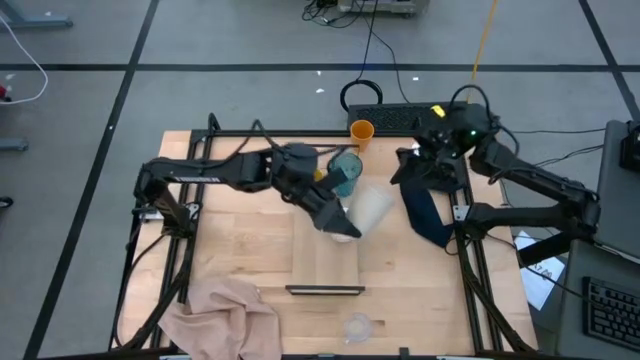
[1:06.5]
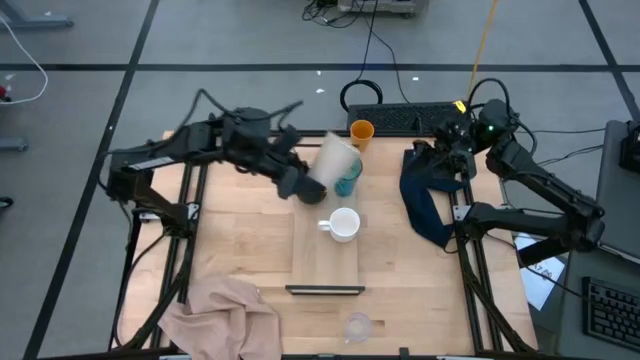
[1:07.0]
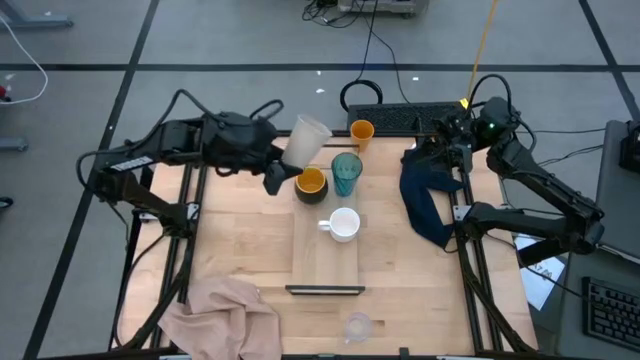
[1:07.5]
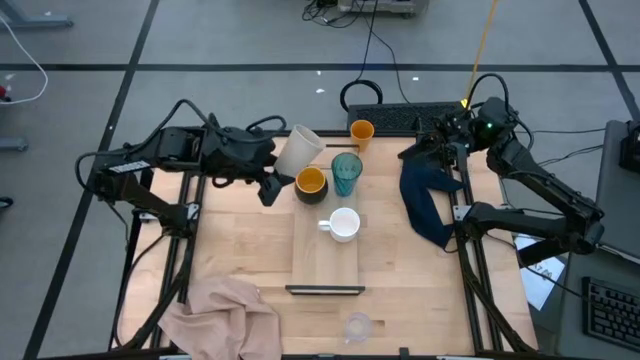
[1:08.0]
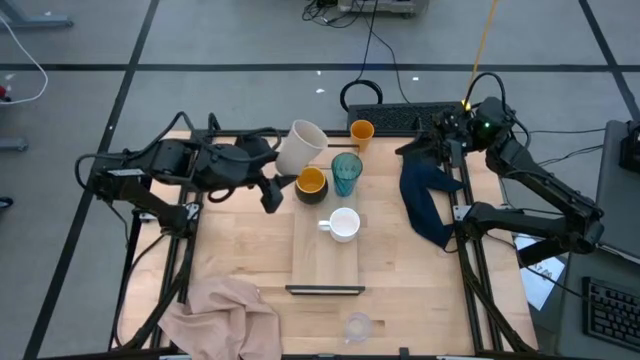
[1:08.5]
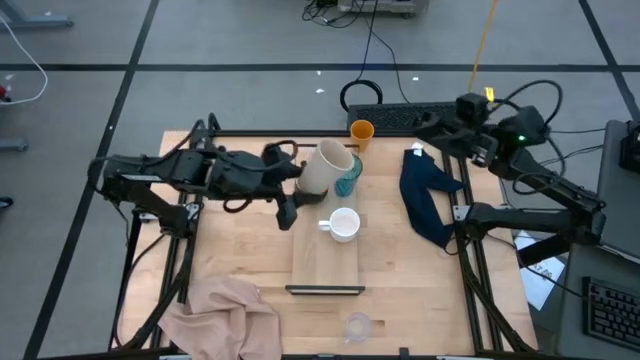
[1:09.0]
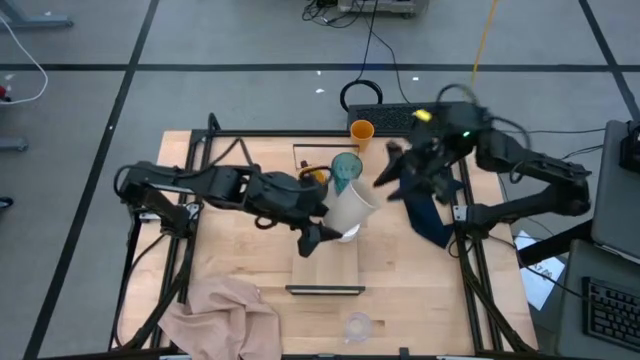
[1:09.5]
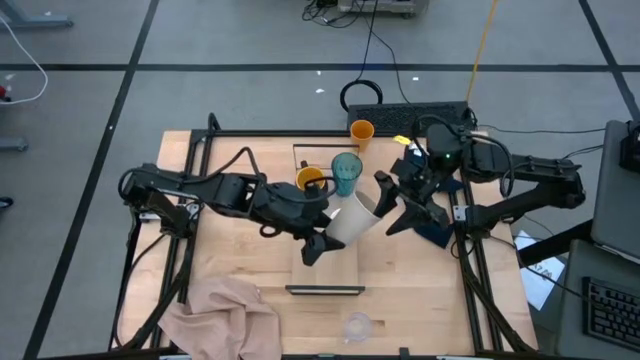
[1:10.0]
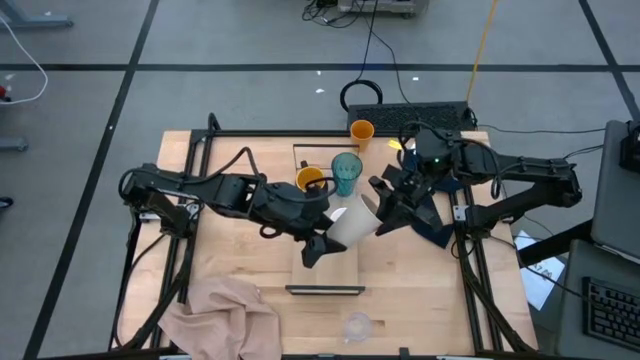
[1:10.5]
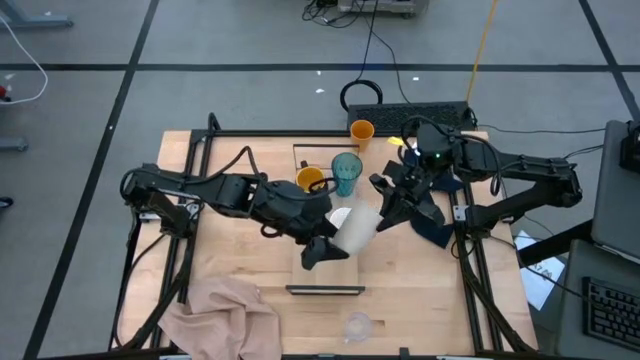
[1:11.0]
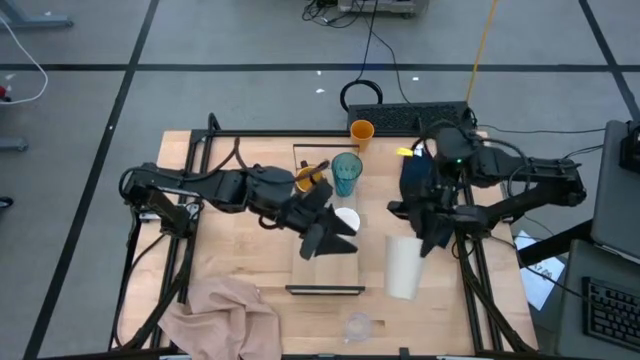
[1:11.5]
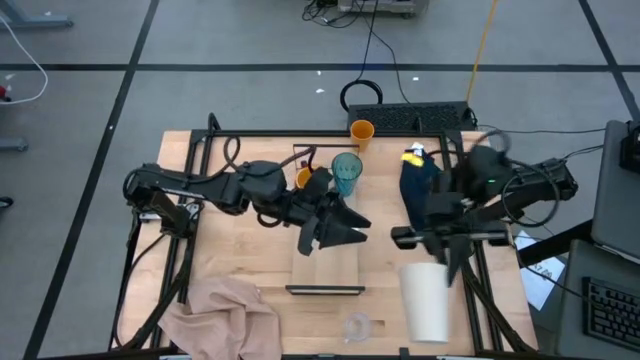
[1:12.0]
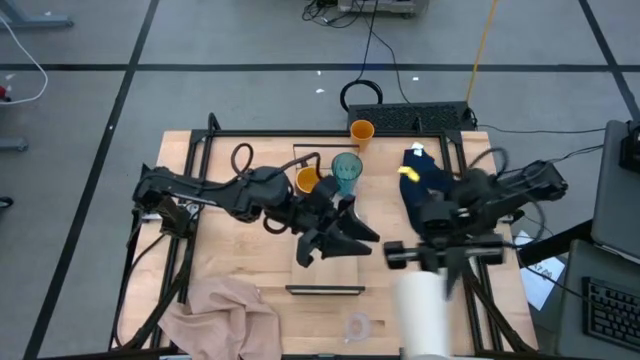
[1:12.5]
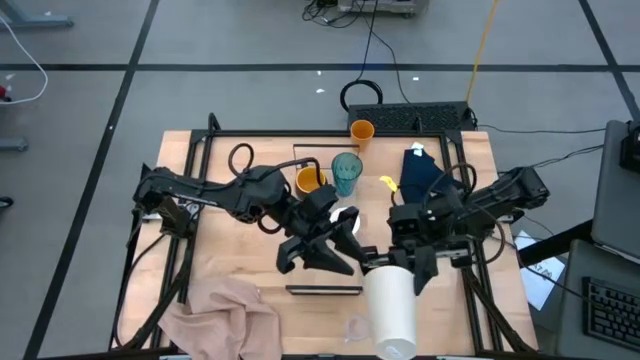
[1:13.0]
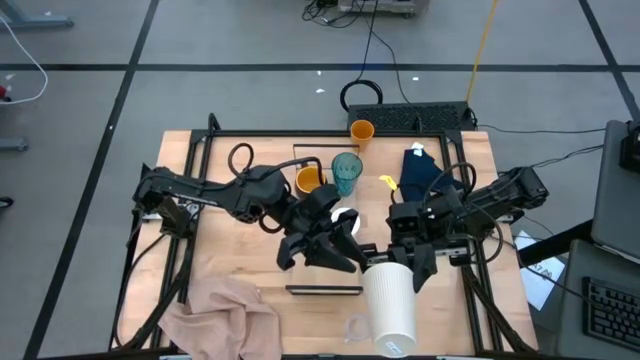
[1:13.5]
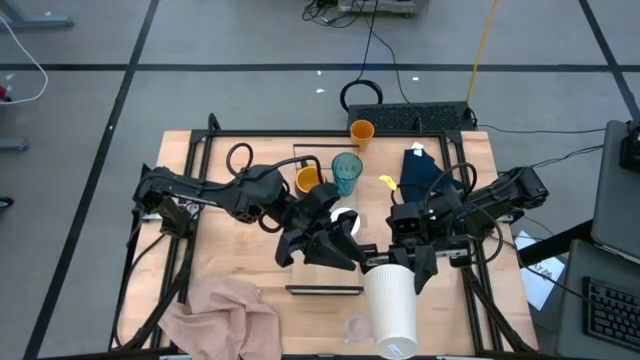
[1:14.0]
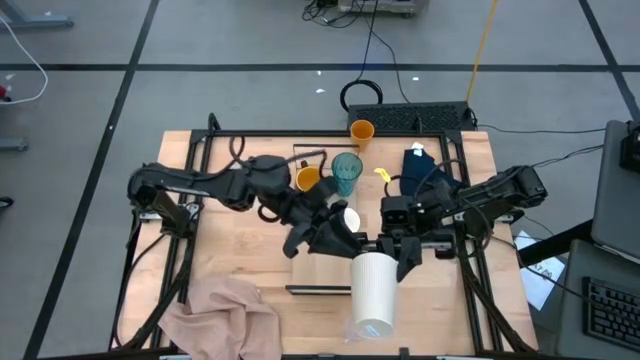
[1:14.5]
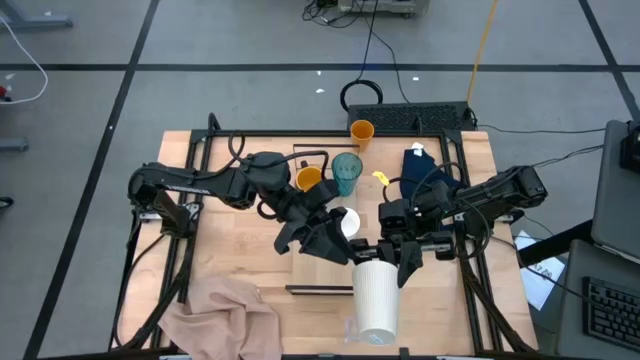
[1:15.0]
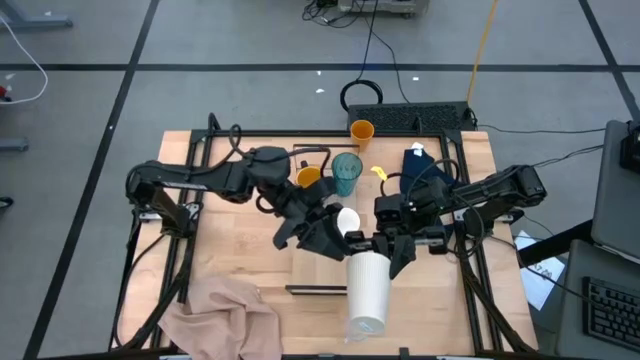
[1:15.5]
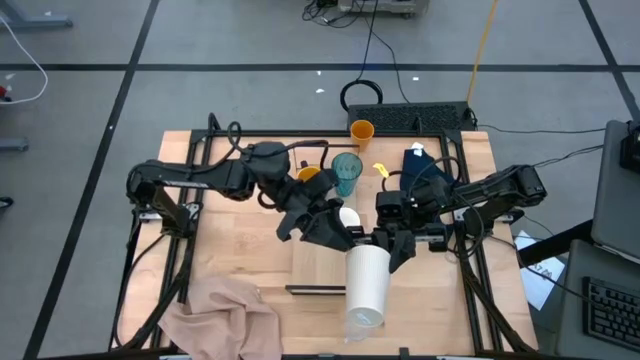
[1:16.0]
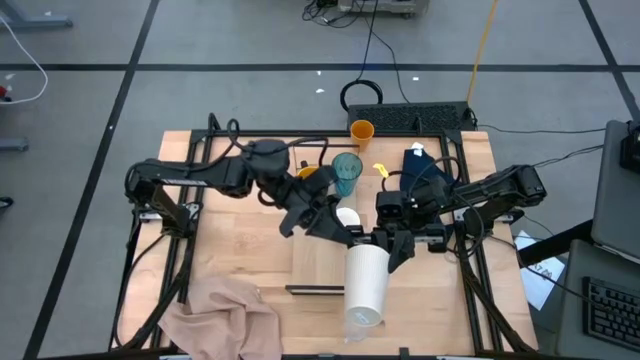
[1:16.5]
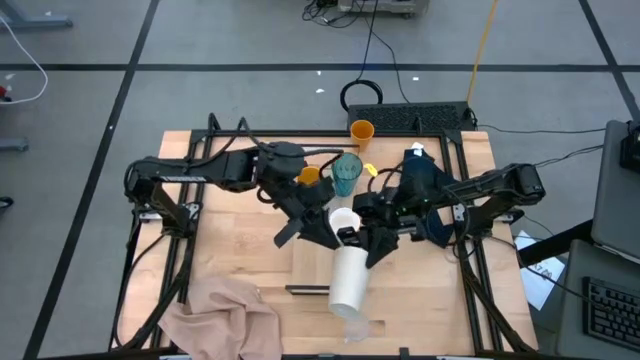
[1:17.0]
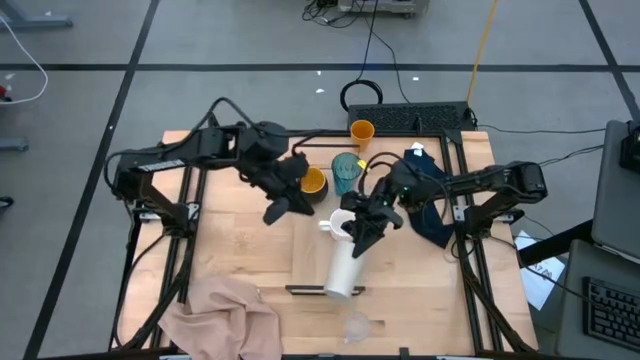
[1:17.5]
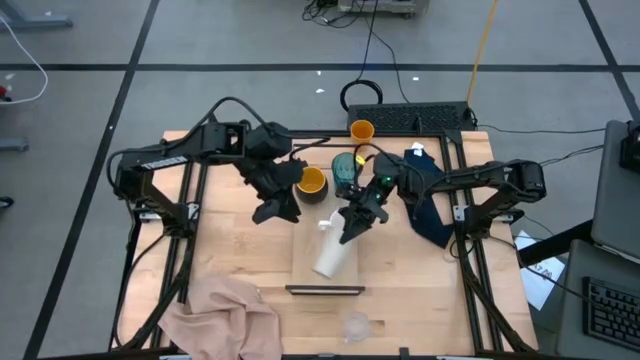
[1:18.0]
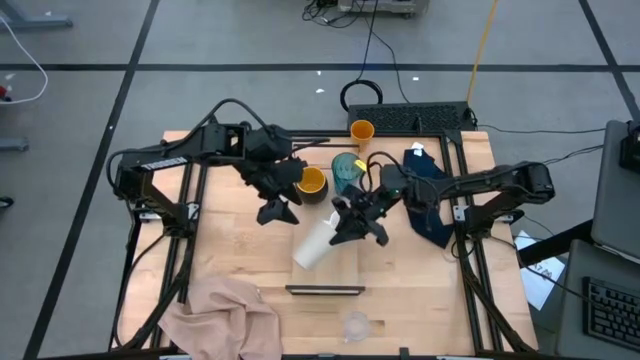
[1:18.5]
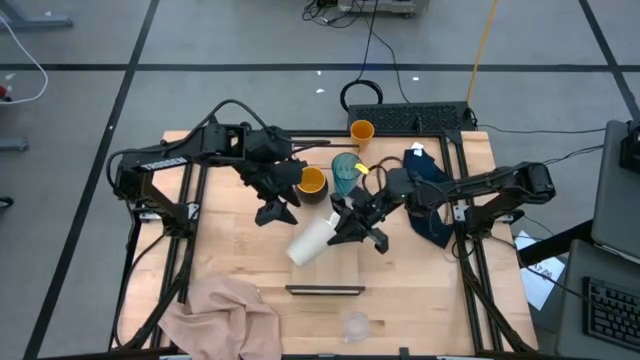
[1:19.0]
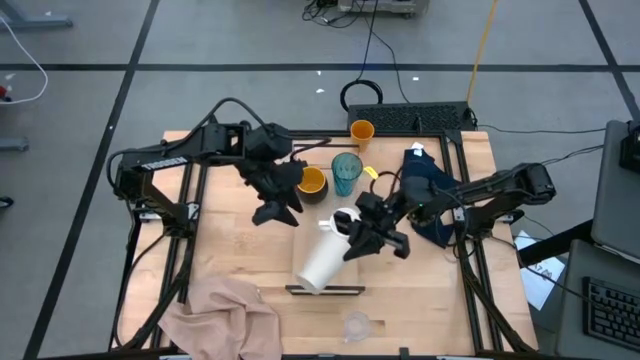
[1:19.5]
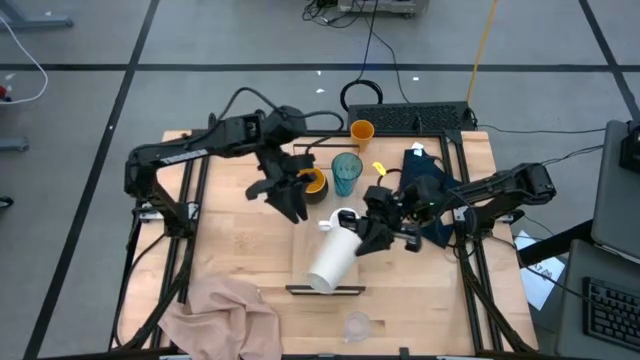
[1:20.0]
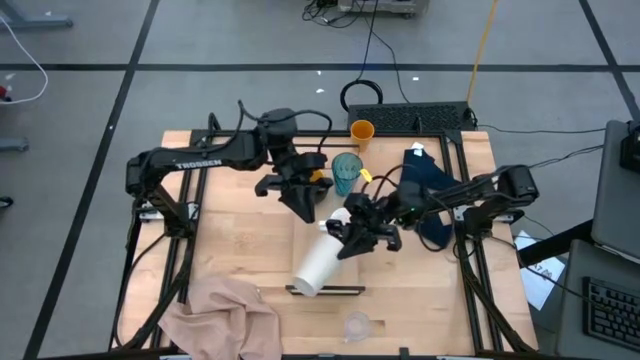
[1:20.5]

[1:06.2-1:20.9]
Task: Stack small to large cups/mugs on shelf
Put the white cup on the shelf

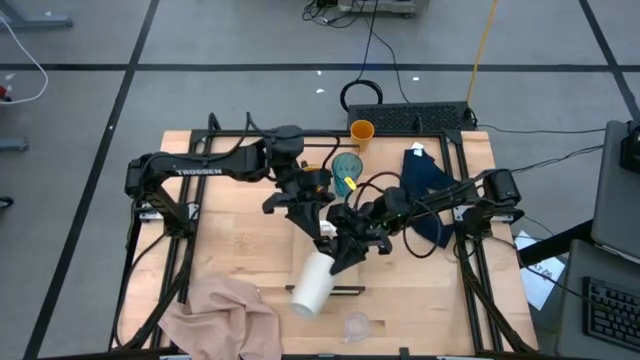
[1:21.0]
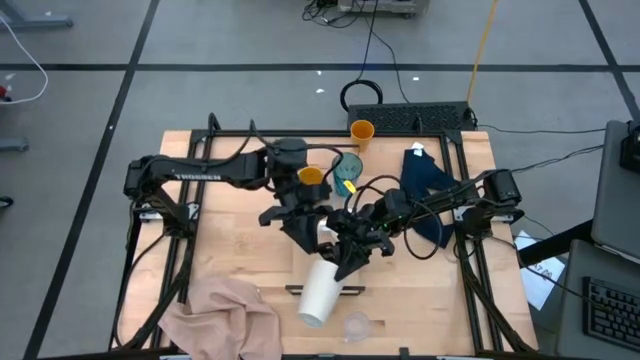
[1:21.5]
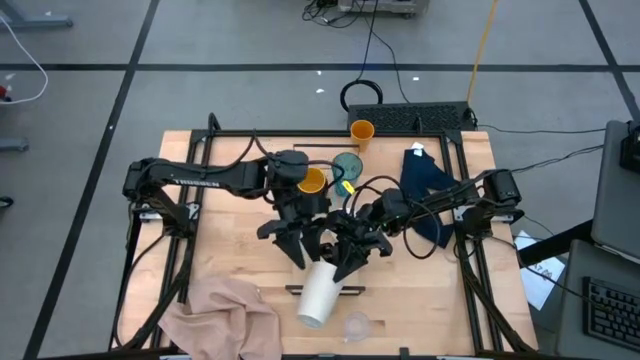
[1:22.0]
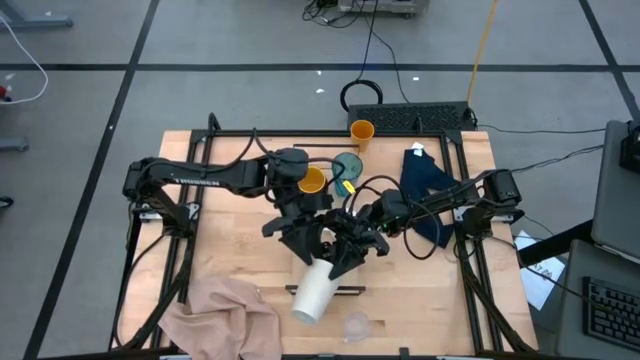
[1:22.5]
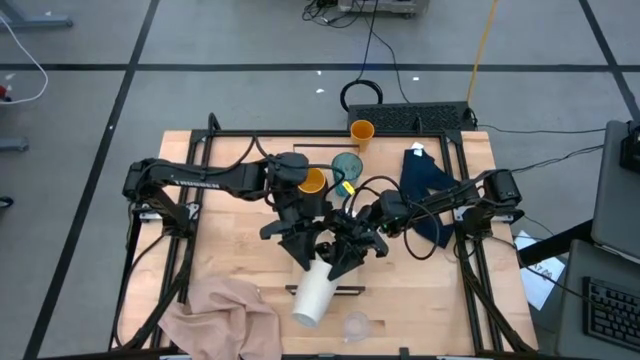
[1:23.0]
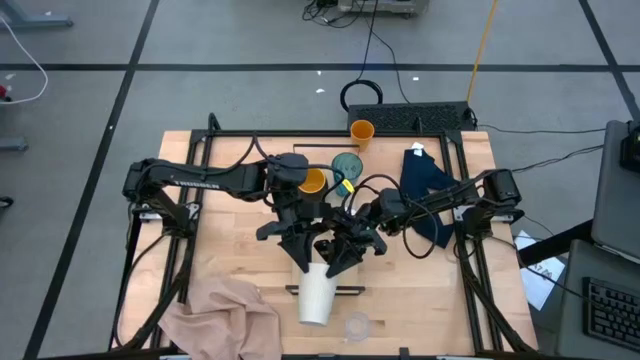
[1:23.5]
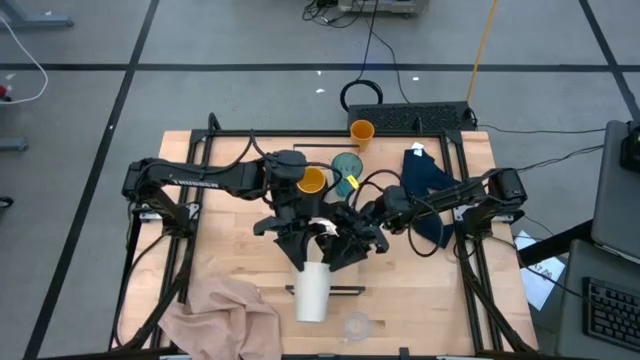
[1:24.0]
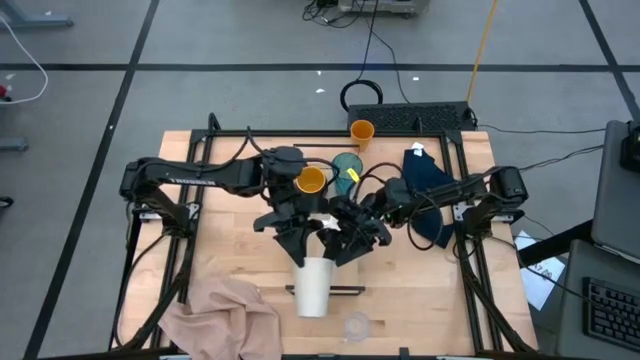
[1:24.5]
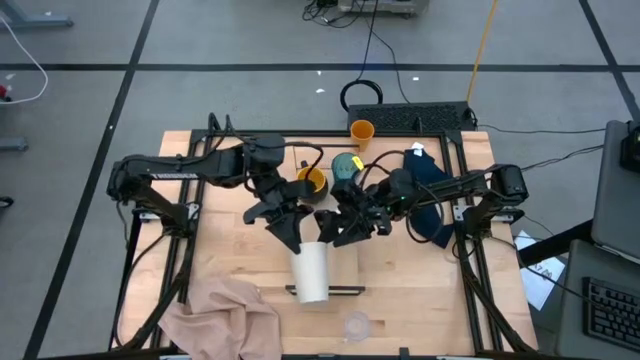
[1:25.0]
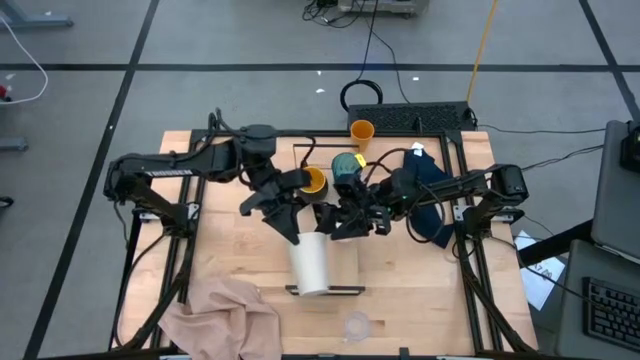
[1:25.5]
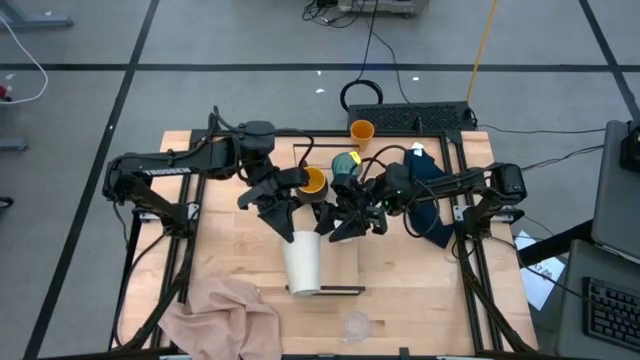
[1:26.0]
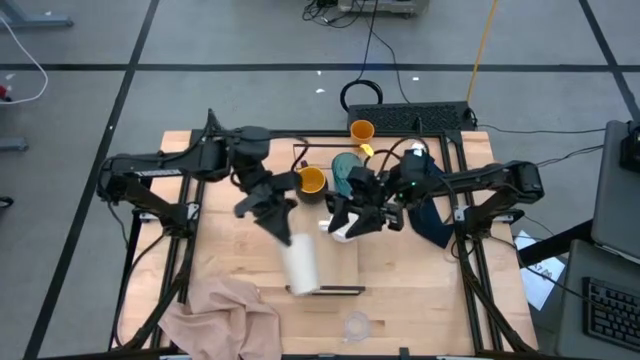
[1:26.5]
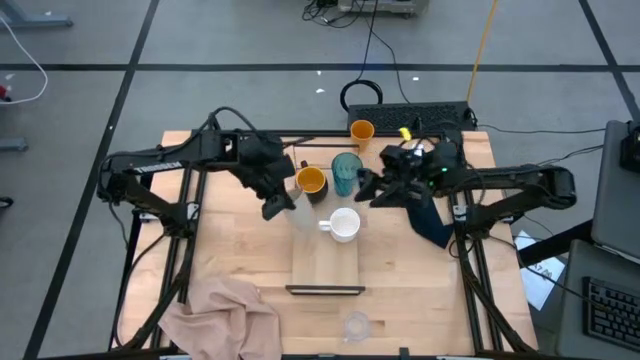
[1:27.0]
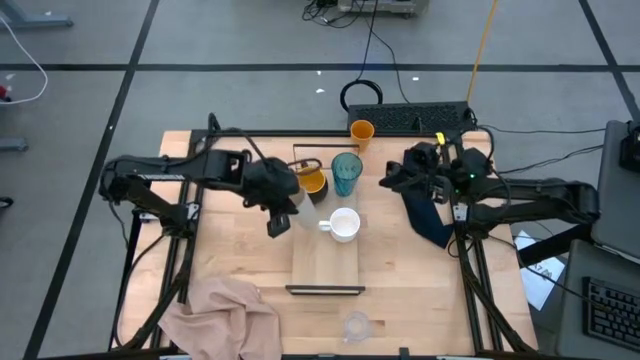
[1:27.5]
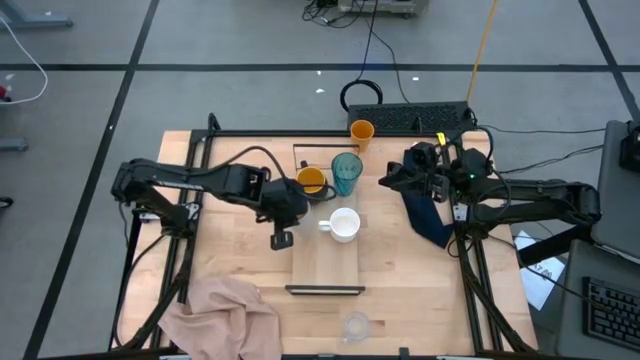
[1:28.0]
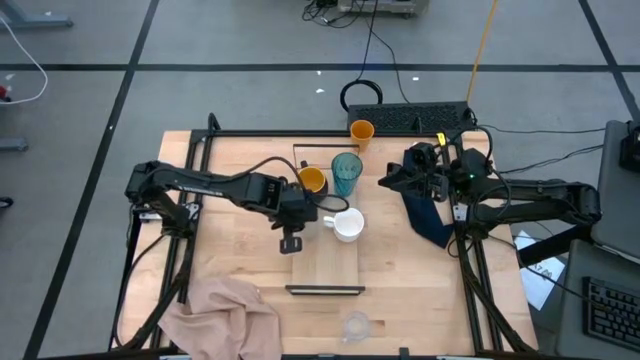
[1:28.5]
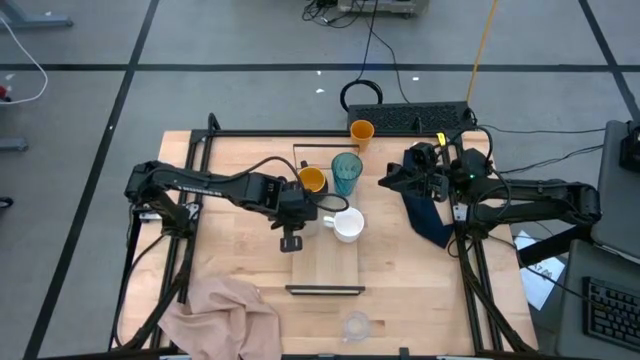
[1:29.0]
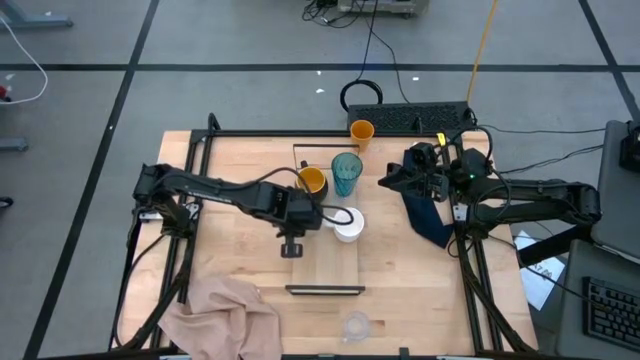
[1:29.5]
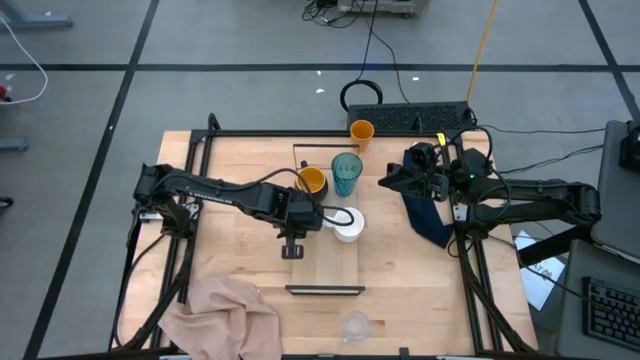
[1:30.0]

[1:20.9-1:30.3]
Put the white cup on the shelf
